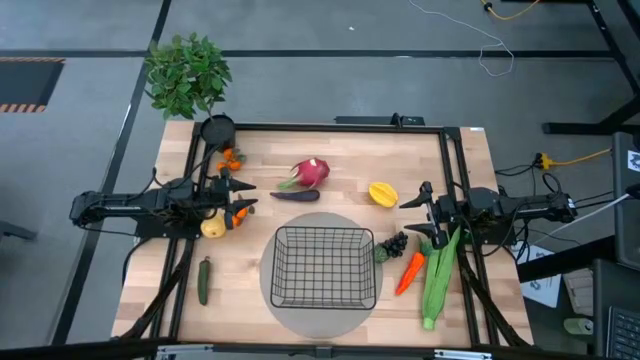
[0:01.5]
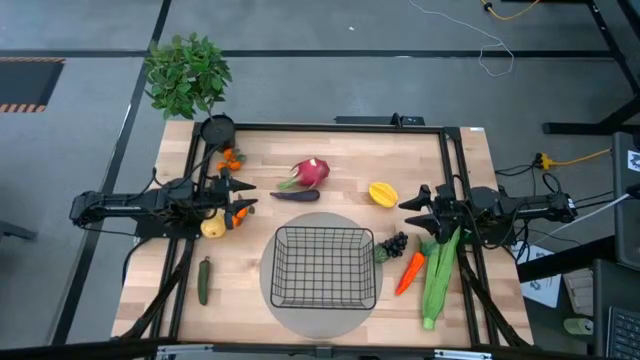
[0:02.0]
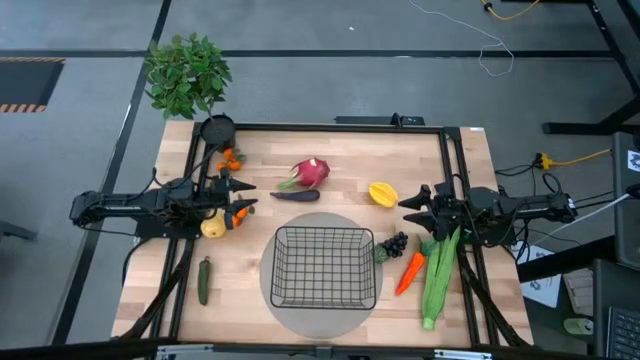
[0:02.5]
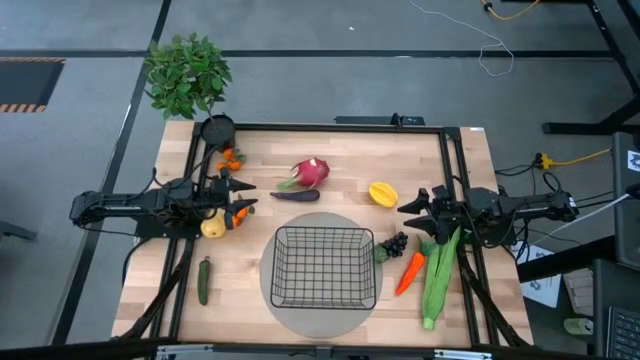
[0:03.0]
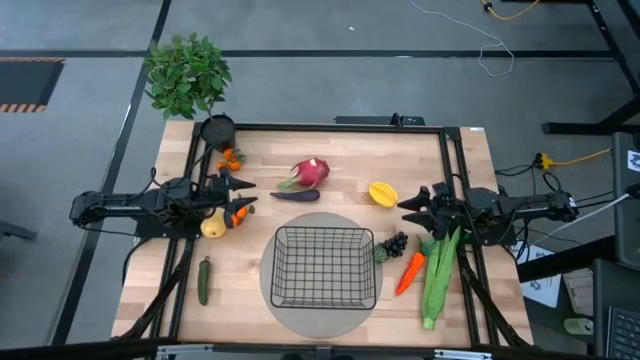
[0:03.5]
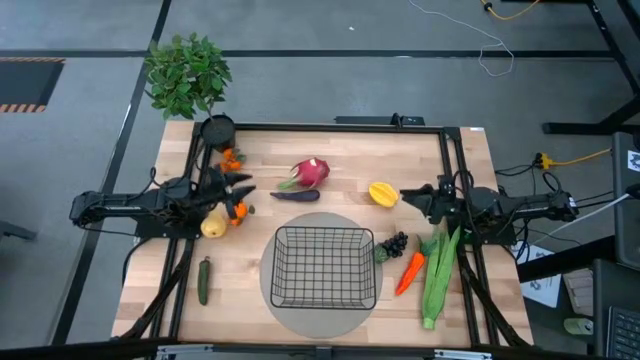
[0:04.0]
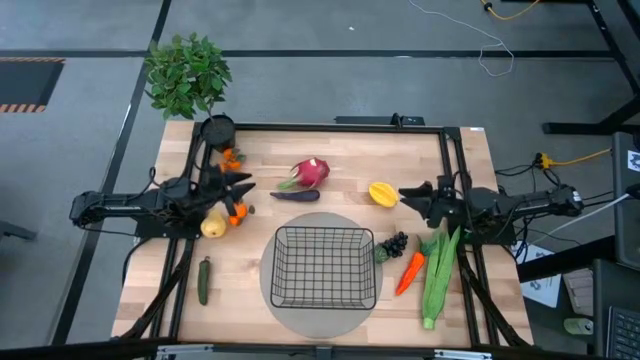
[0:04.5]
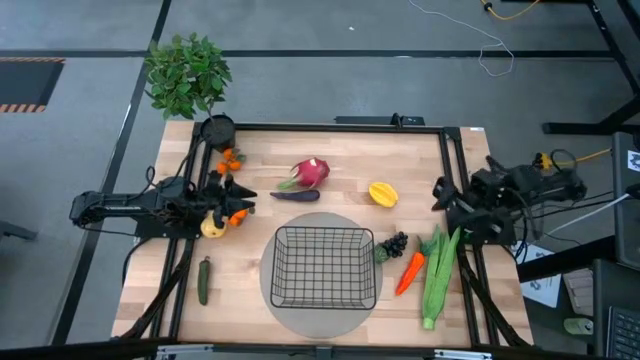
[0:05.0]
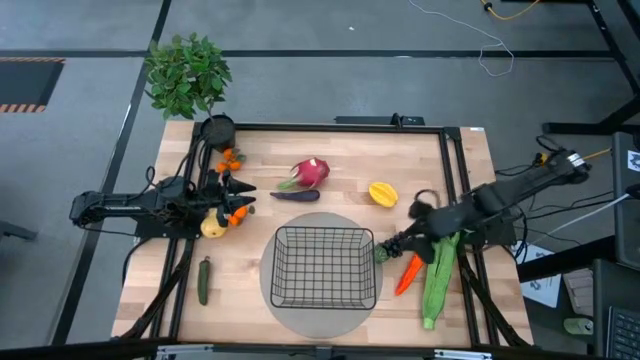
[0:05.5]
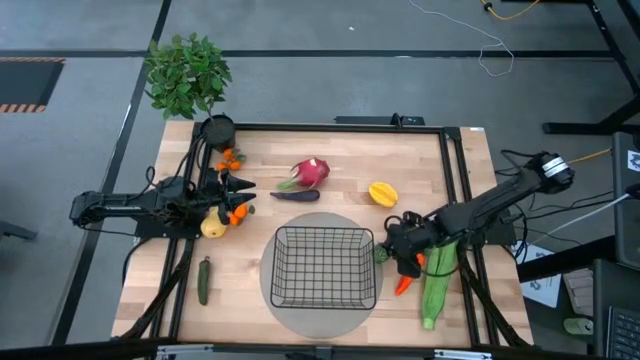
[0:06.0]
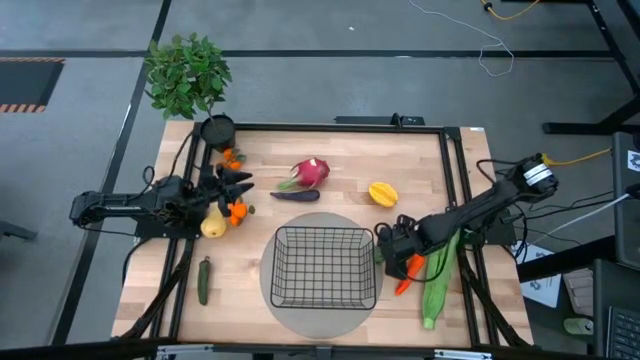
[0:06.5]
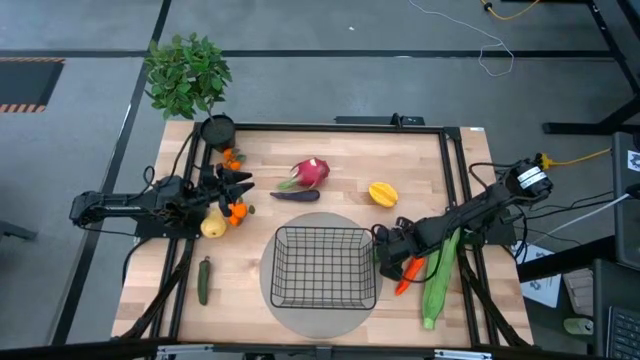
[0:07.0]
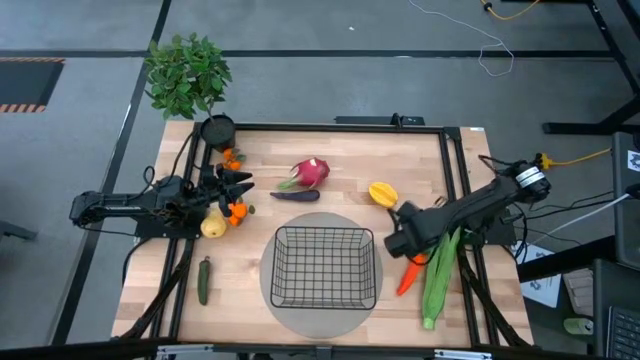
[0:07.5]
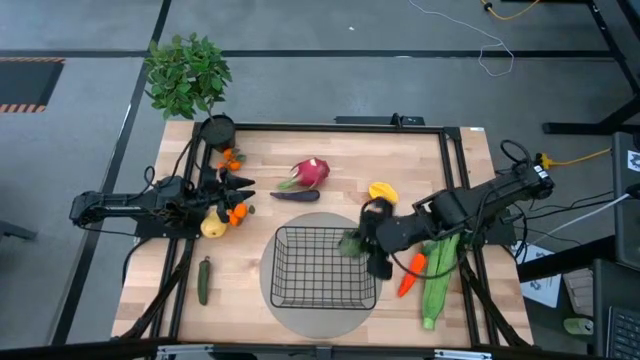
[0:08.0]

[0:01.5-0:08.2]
Task: Build produce basket
Put the black grapes into the black wire basket

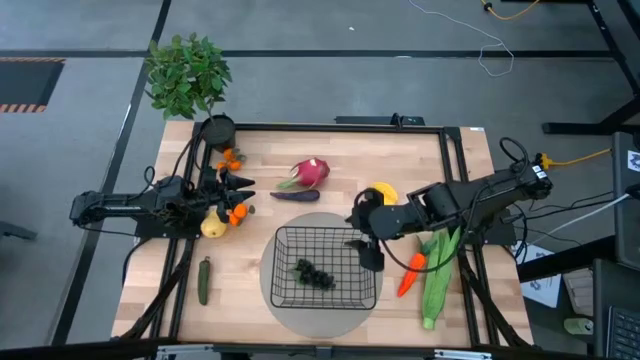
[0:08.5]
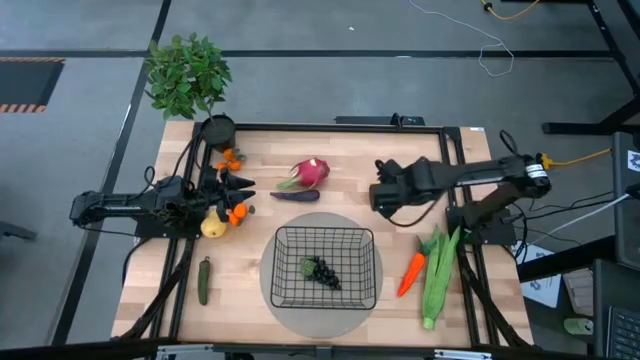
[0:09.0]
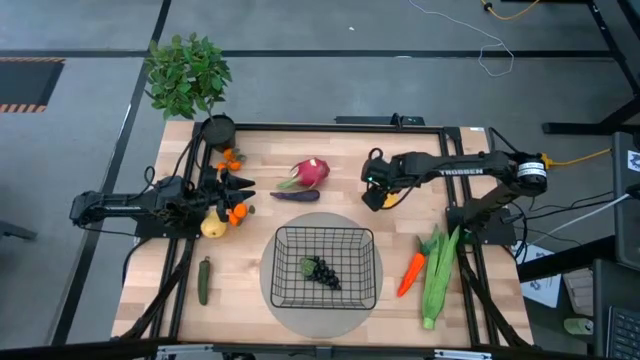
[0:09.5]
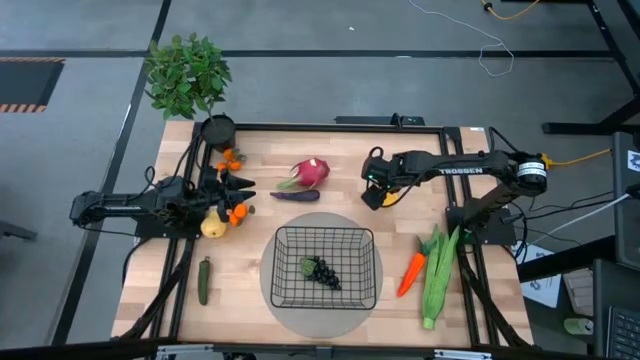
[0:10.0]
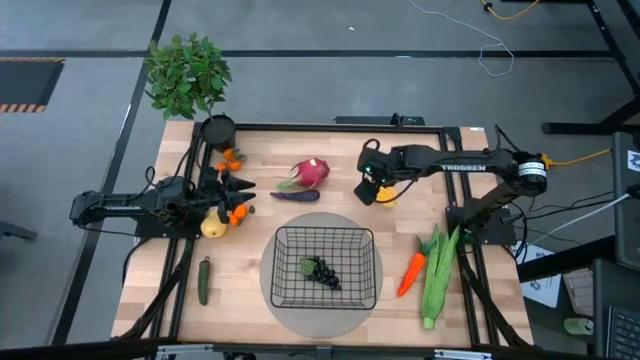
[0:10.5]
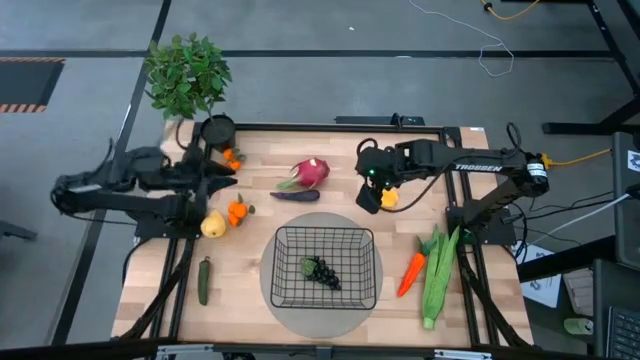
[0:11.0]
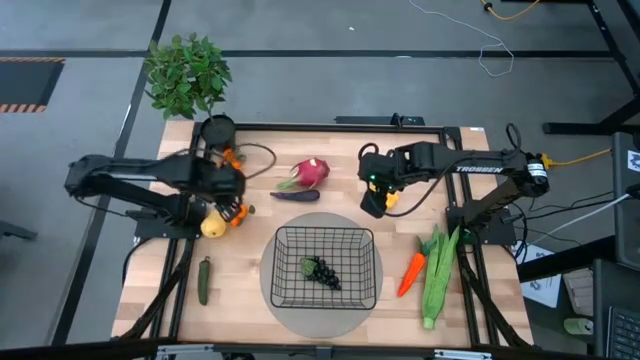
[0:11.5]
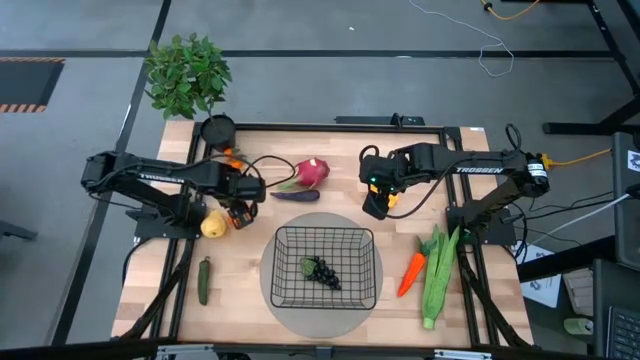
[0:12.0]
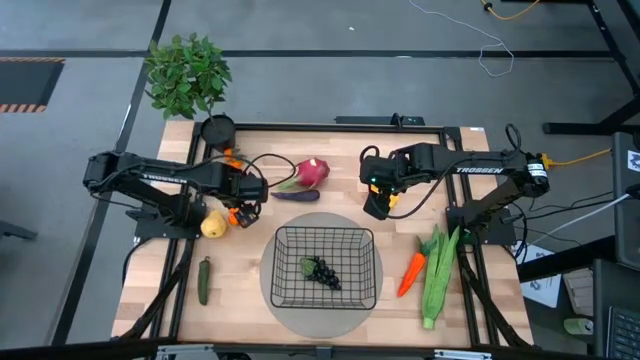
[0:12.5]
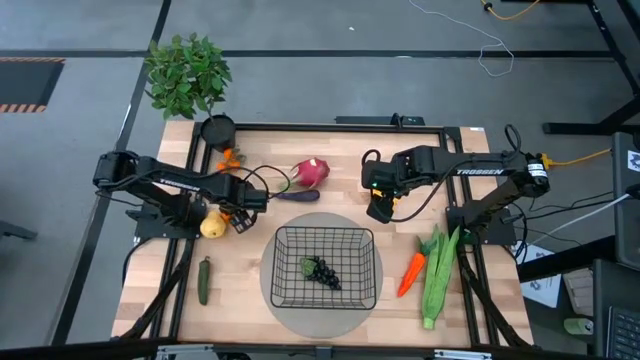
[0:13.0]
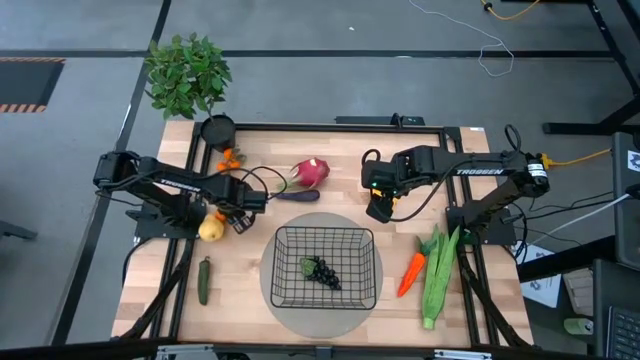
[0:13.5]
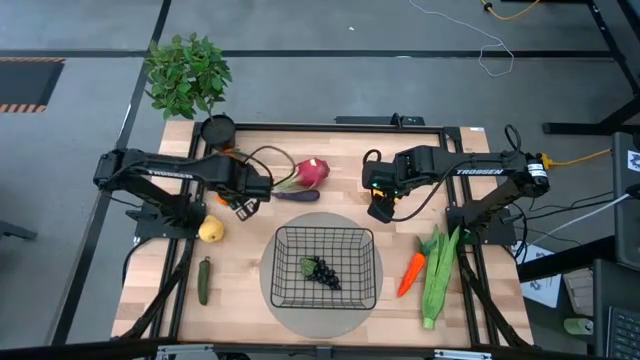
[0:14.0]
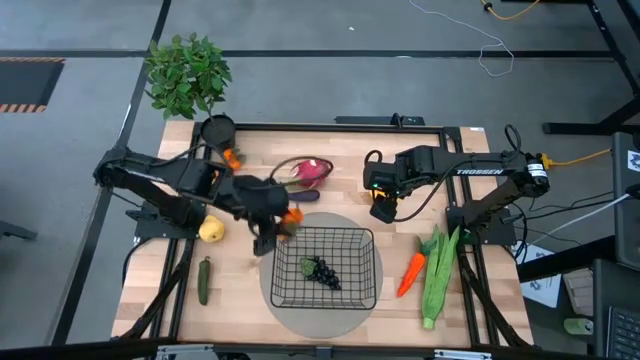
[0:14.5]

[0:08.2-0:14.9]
Put the bottom tangerines into the black wire basket

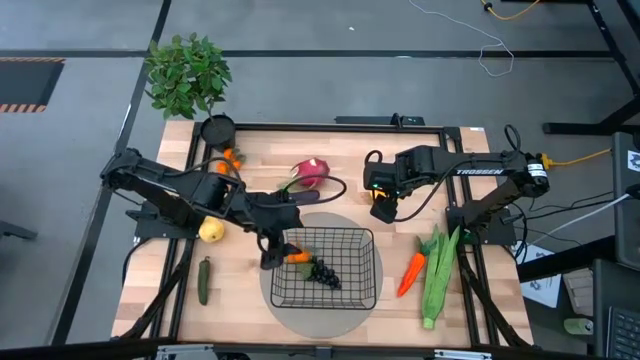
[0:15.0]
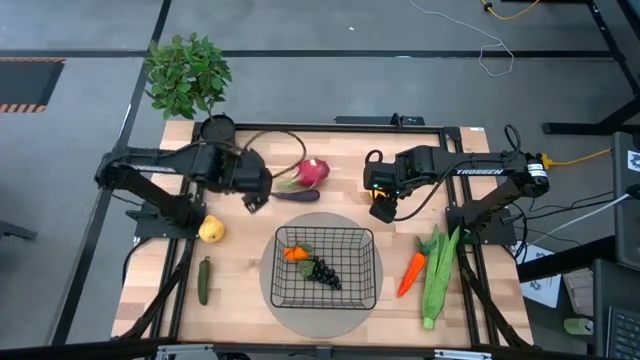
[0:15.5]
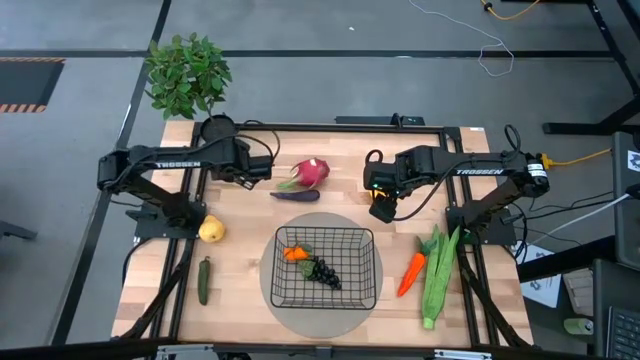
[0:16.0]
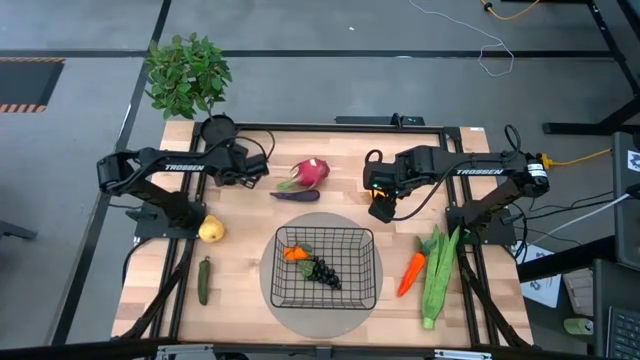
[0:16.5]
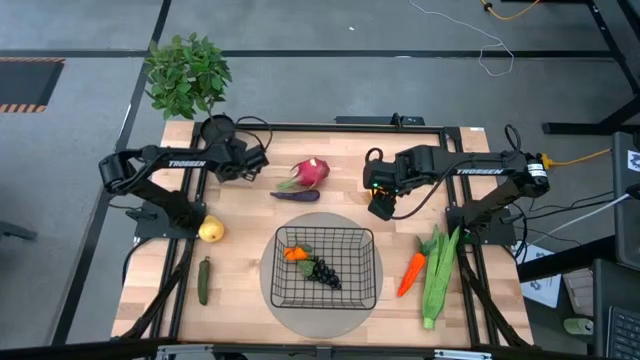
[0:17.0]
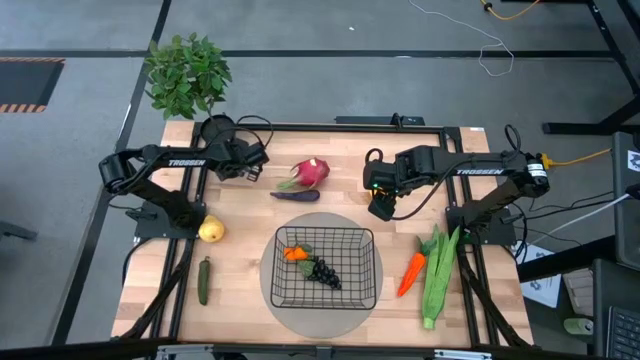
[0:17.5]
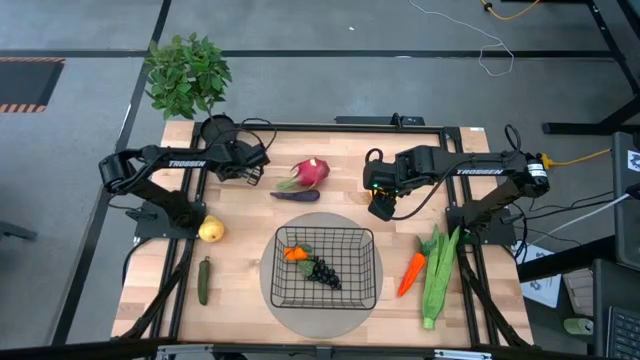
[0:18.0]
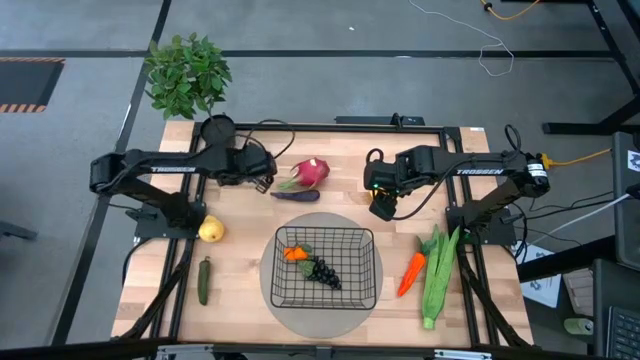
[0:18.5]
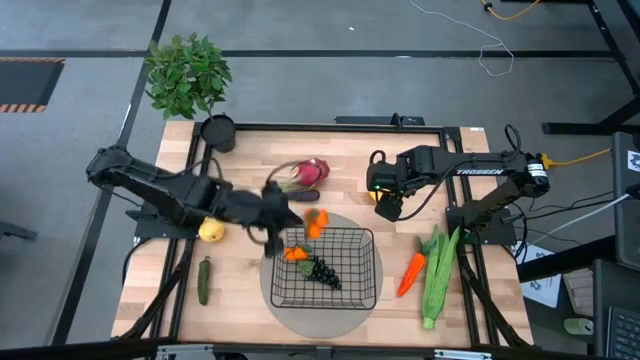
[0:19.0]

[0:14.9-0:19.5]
Put the tangerines into the black wire basket

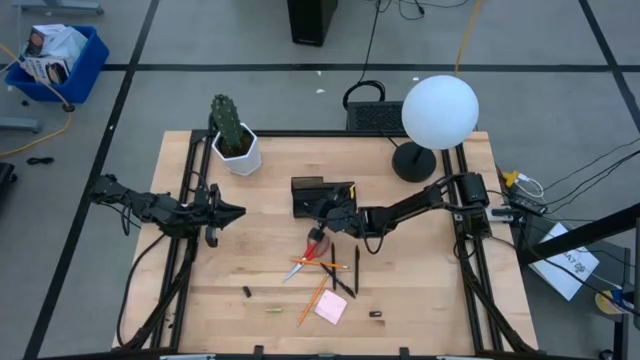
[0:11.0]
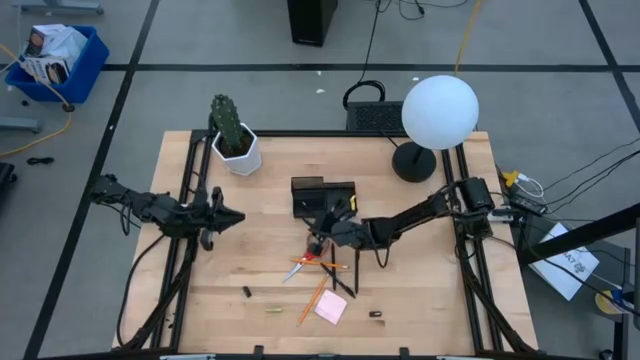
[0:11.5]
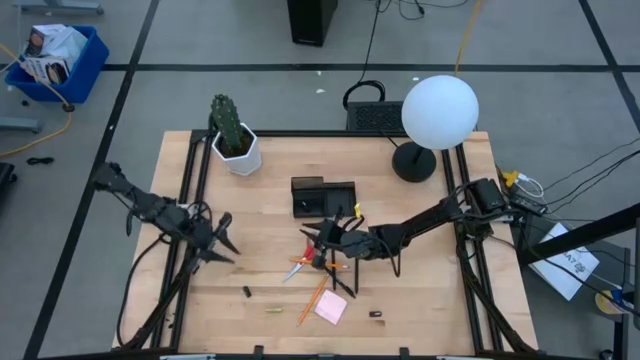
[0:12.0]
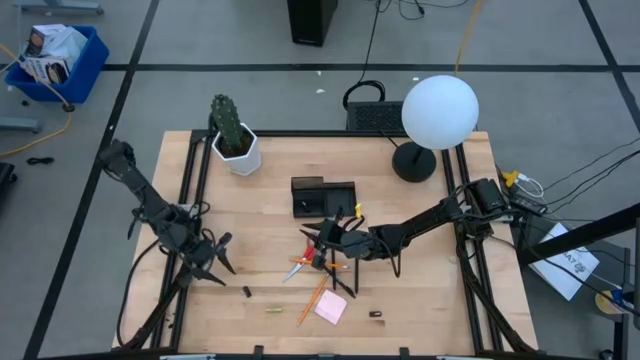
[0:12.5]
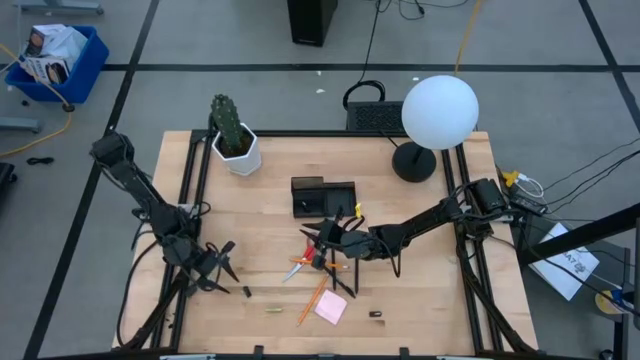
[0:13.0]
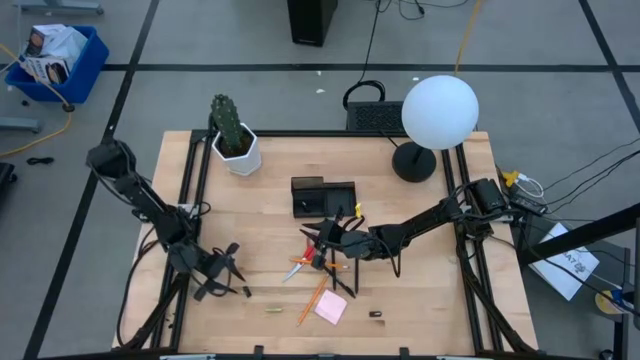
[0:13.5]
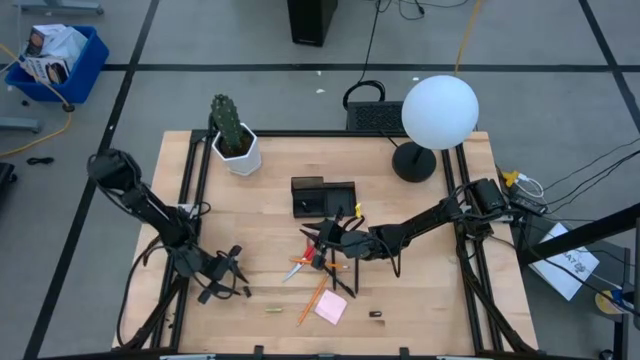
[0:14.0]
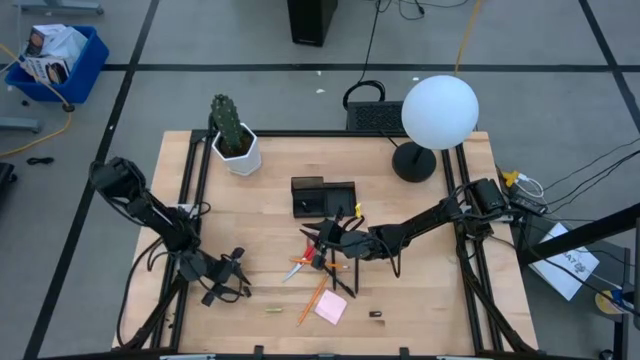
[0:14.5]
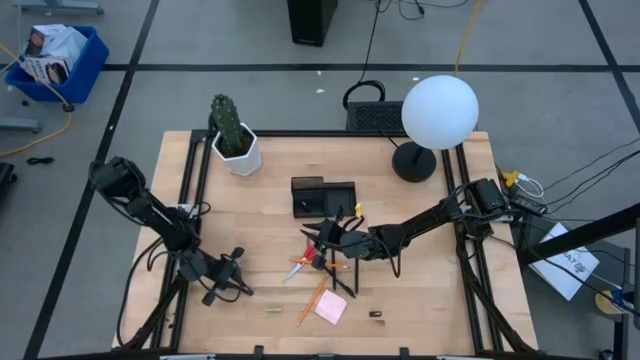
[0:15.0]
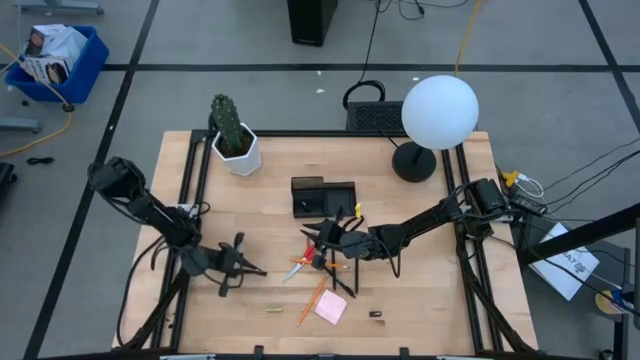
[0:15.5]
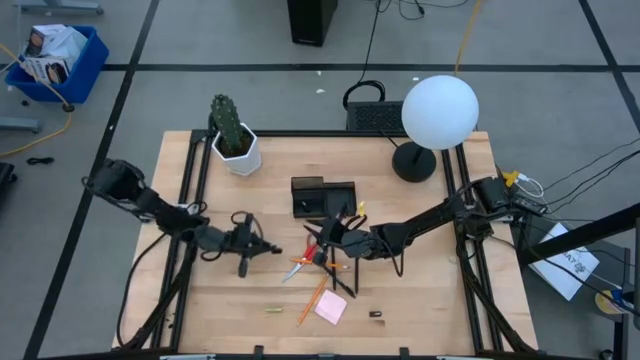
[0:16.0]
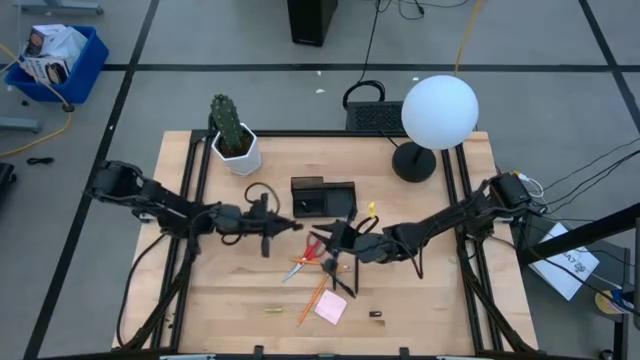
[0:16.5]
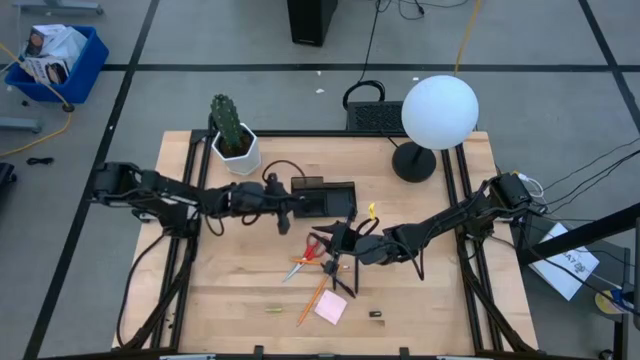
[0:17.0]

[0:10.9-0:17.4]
Task: Pick and place office supplies into organizer
Put the left black binder clip into the bottom left of the desk organizer
